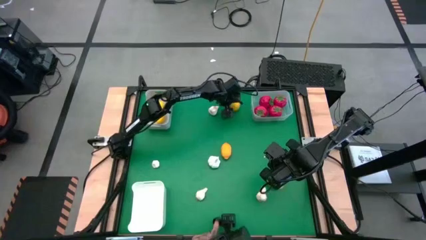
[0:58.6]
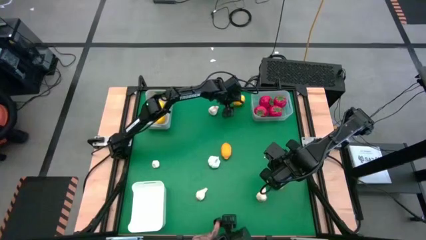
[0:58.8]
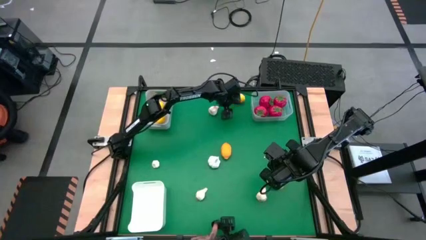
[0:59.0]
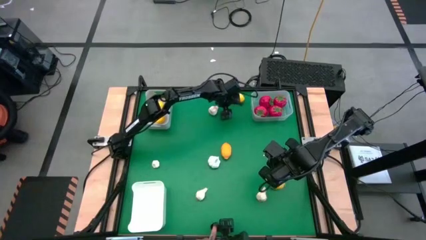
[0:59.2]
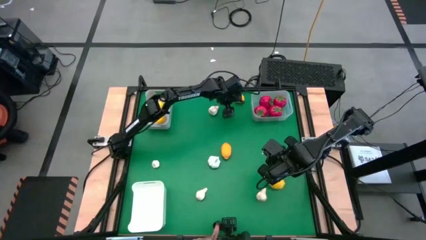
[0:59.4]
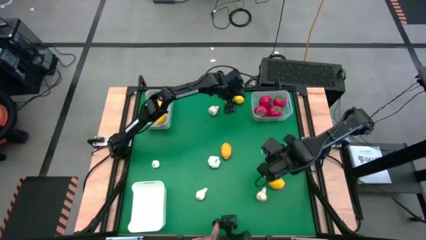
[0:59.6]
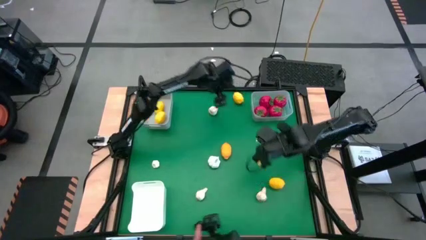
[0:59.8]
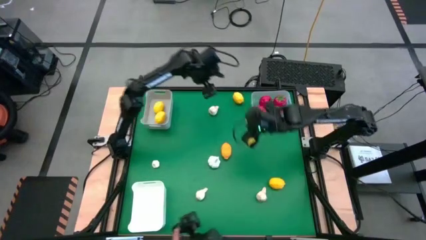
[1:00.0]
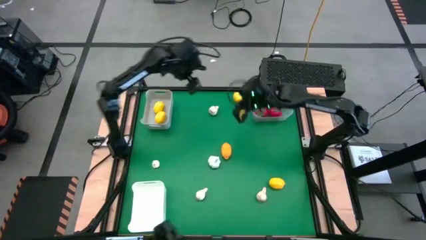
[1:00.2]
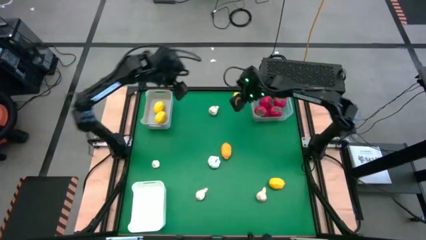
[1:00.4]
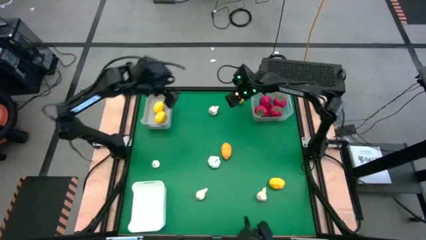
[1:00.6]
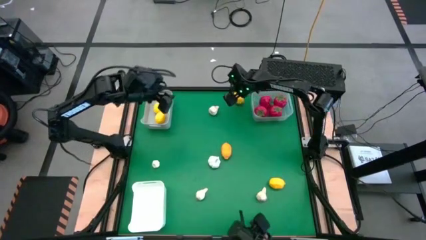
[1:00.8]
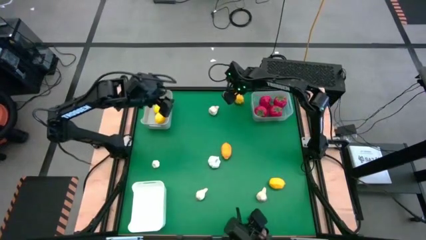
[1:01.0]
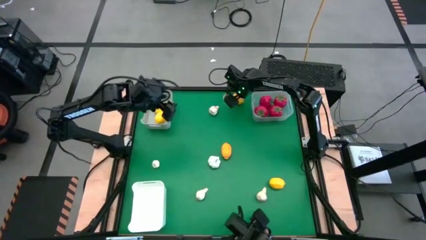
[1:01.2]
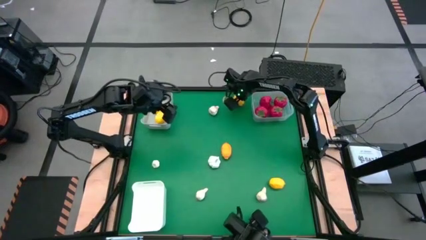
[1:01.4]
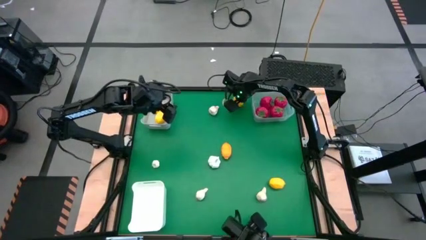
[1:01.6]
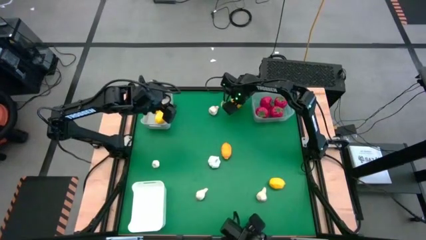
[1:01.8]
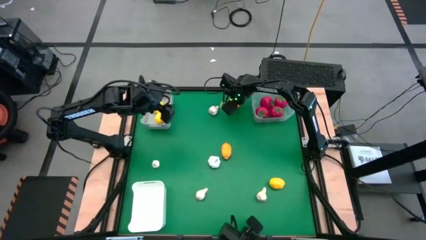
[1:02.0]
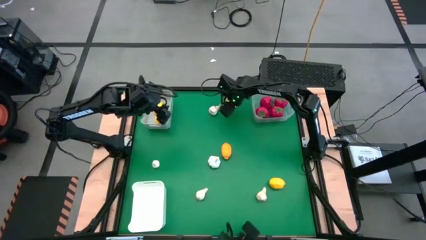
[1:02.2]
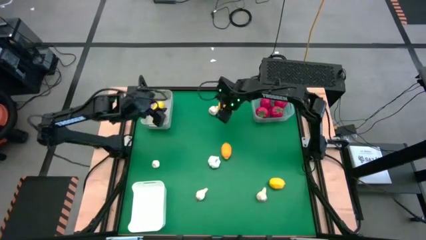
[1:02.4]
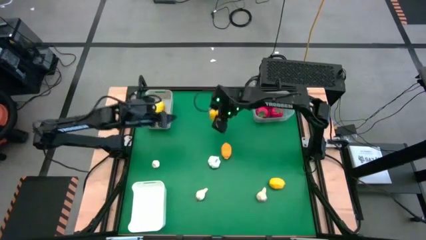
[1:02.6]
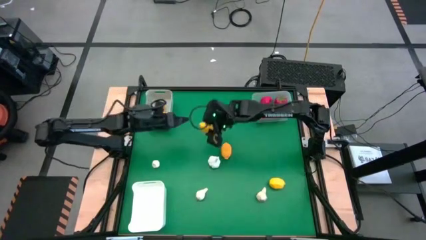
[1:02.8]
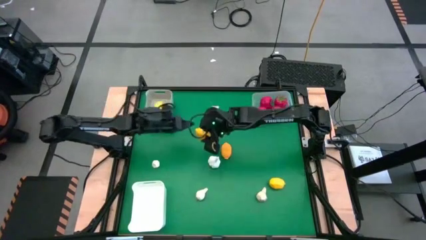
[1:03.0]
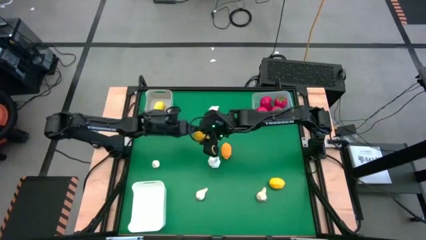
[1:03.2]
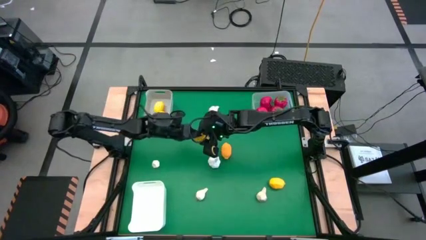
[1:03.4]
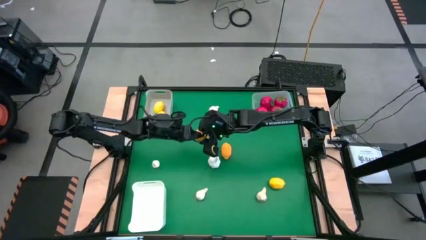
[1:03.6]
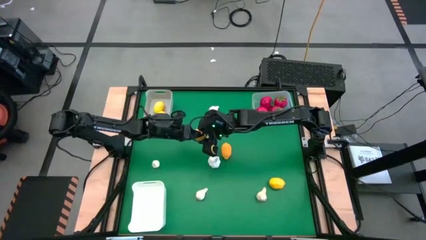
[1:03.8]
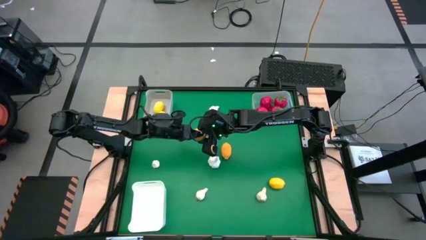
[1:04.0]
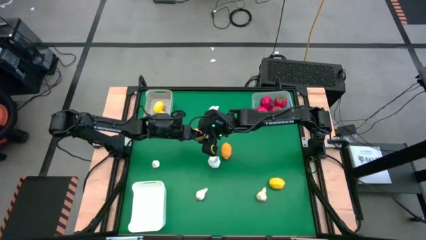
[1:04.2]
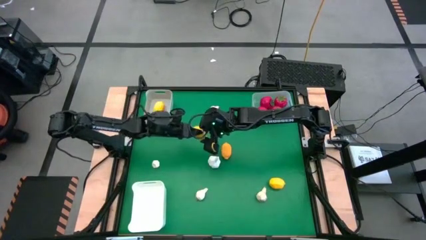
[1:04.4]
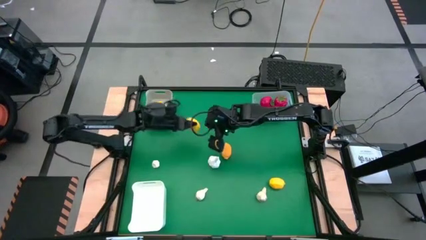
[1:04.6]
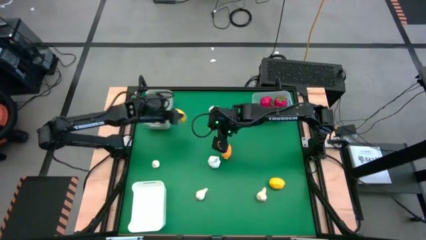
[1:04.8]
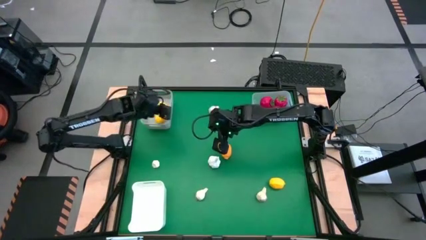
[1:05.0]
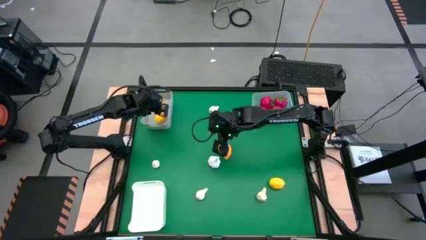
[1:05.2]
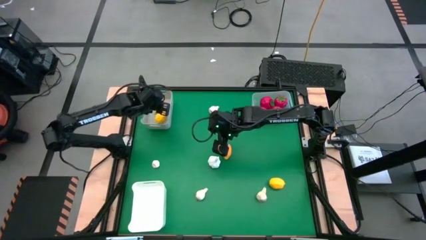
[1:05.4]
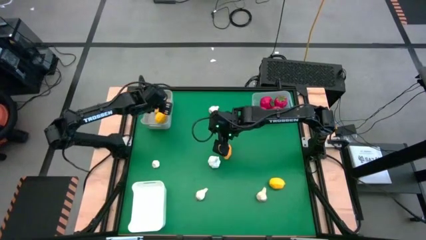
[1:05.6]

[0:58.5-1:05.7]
Task: Sort produce into baskets
Put the lemon into the gray bin

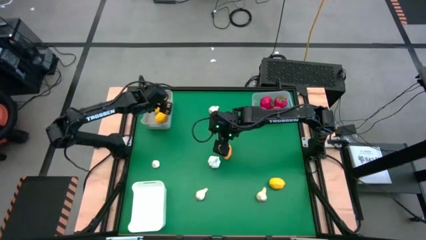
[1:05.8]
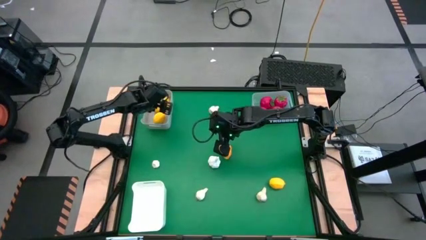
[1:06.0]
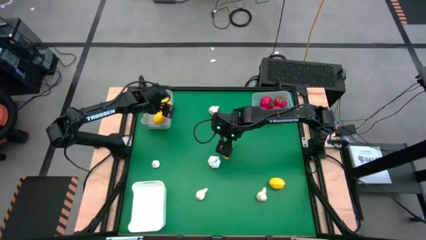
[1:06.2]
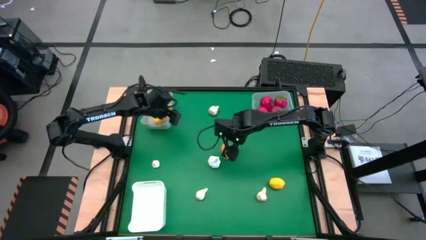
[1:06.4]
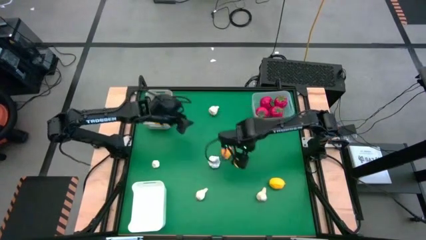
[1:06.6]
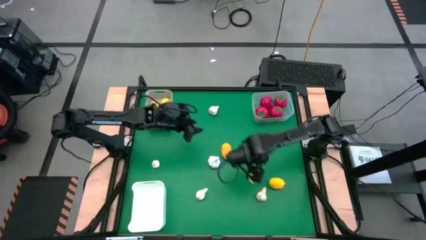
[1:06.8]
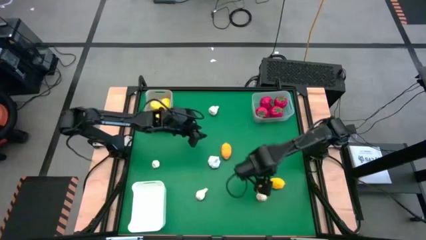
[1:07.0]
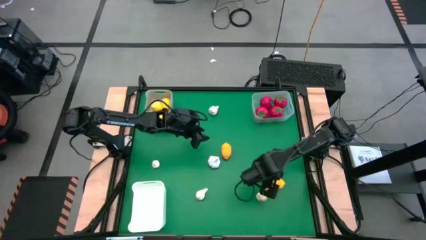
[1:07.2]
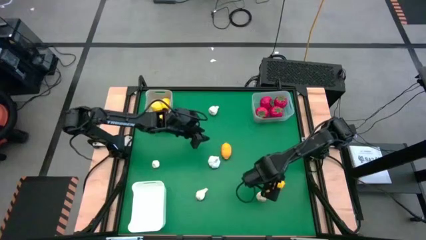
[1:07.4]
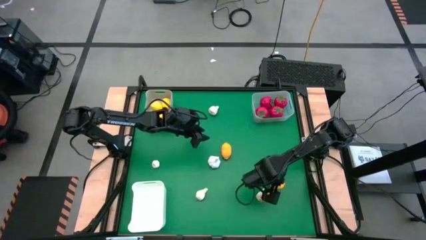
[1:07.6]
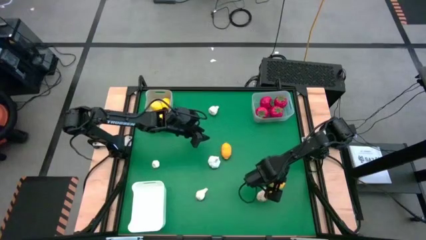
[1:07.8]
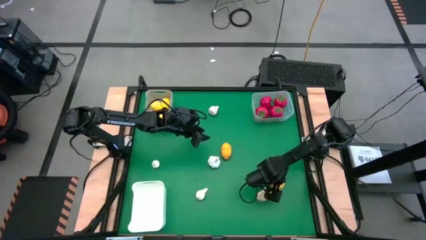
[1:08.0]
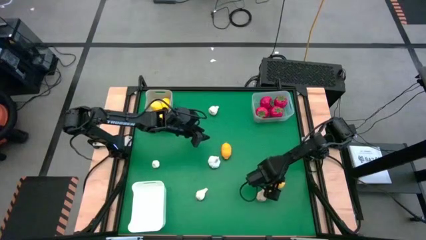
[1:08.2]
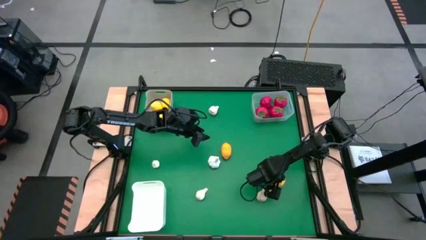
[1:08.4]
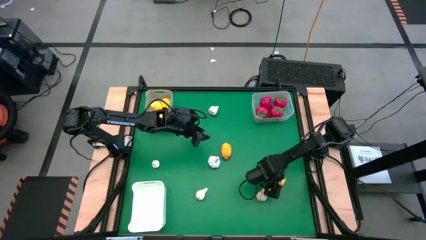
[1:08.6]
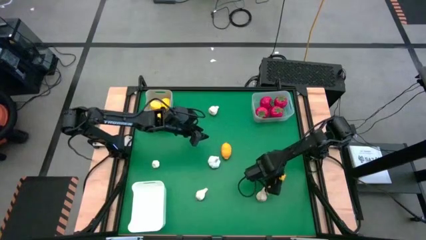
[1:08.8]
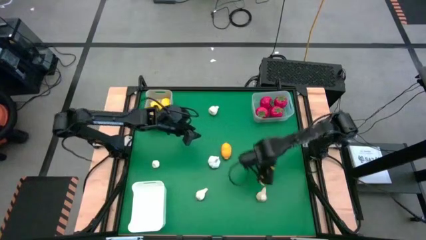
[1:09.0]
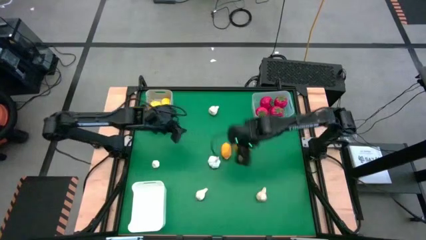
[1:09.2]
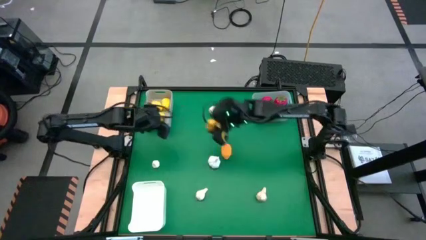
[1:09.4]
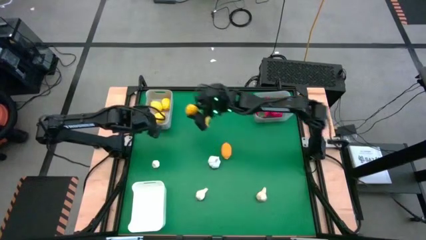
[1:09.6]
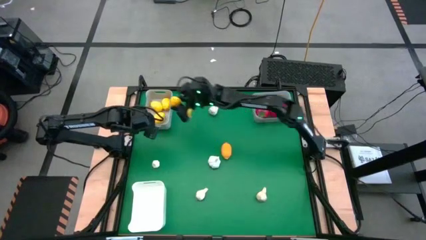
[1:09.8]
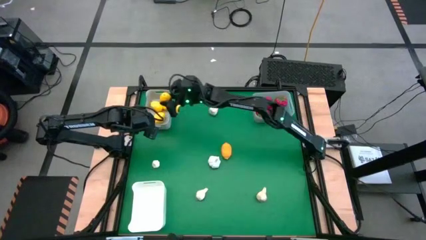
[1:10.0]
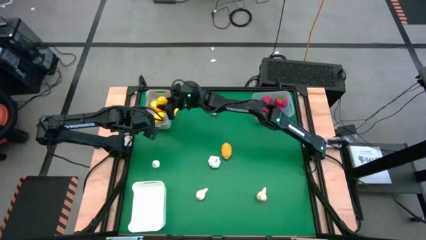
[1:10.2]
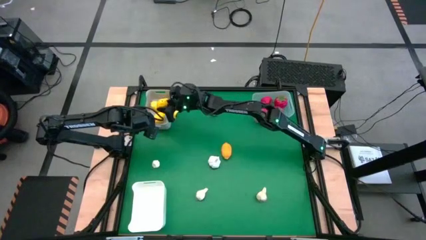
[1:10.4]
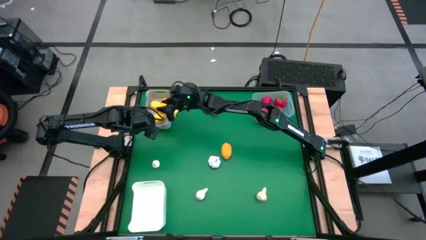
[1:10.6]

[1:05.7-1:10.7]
Put the lemon into the gray bin

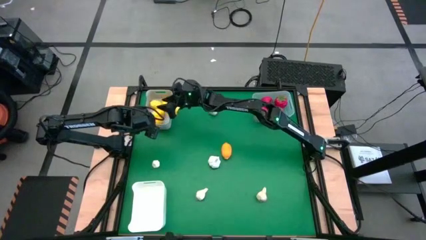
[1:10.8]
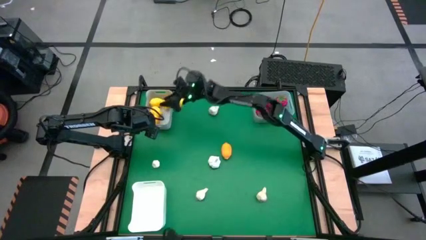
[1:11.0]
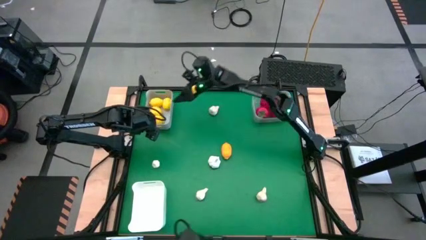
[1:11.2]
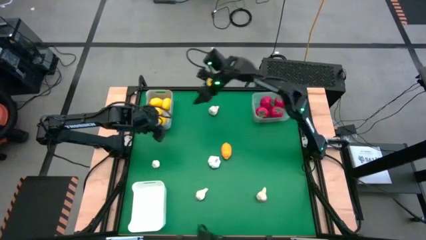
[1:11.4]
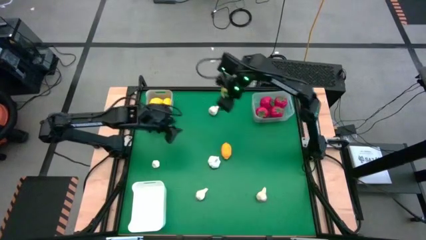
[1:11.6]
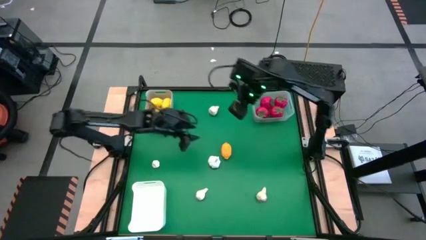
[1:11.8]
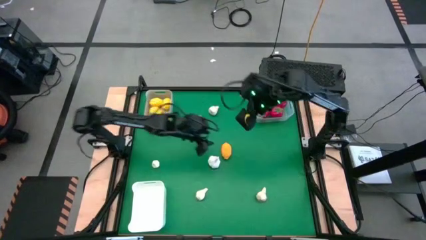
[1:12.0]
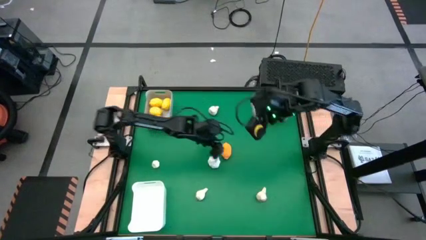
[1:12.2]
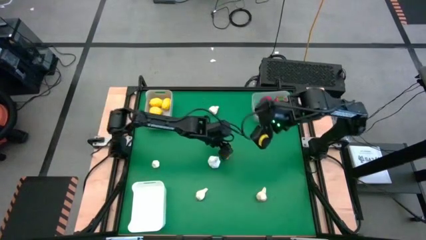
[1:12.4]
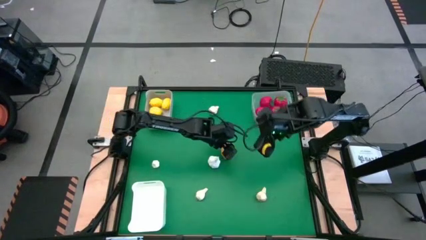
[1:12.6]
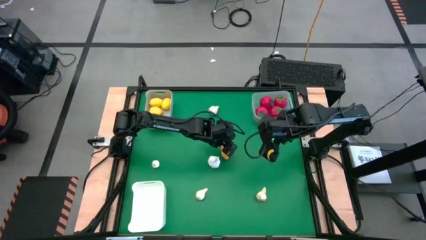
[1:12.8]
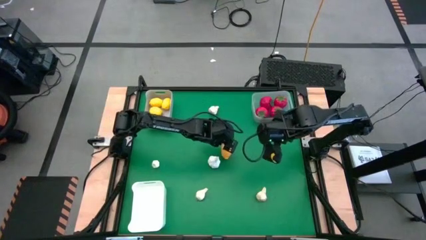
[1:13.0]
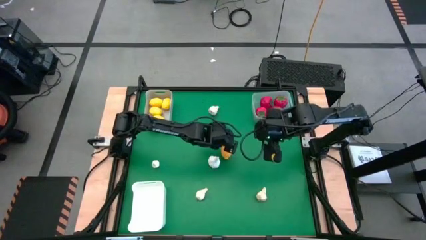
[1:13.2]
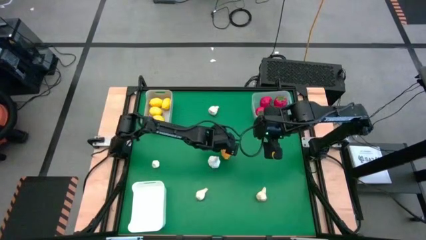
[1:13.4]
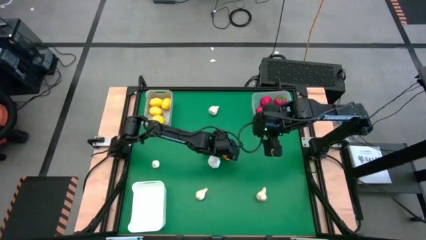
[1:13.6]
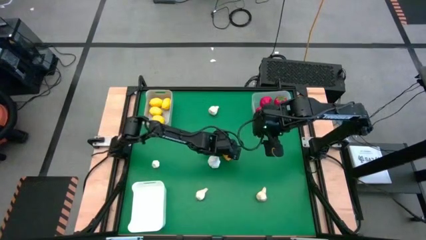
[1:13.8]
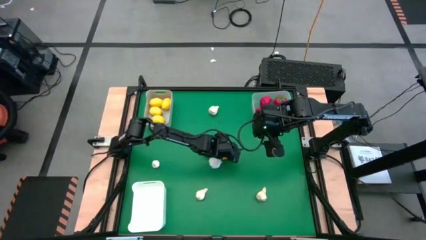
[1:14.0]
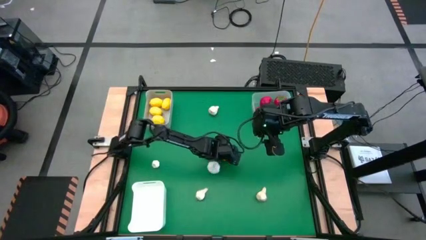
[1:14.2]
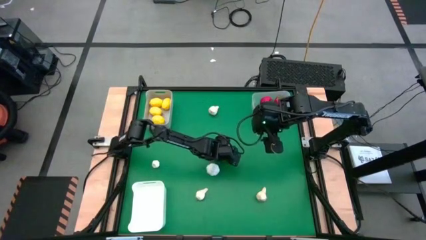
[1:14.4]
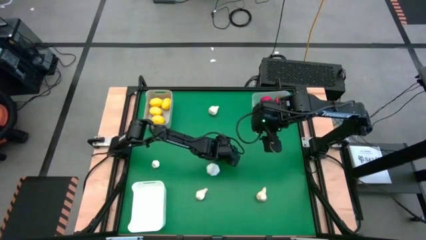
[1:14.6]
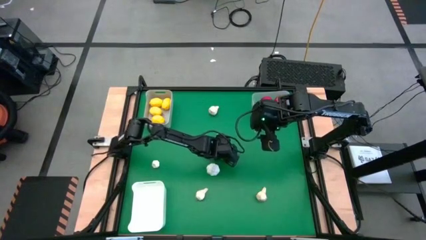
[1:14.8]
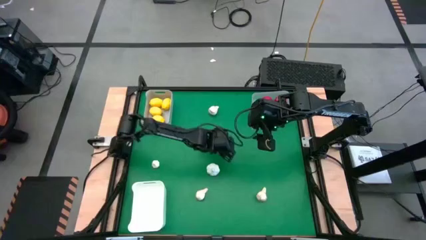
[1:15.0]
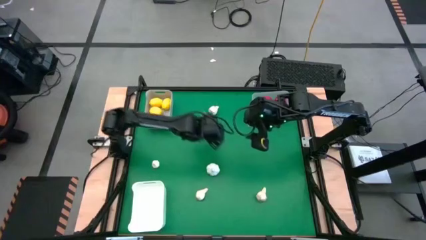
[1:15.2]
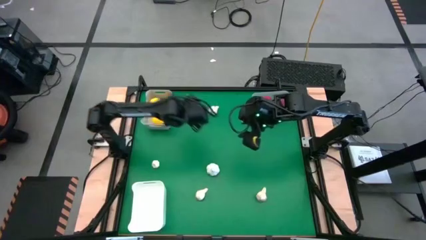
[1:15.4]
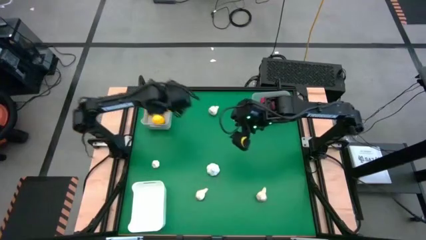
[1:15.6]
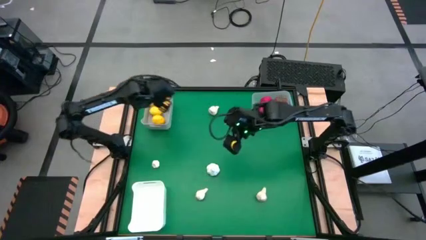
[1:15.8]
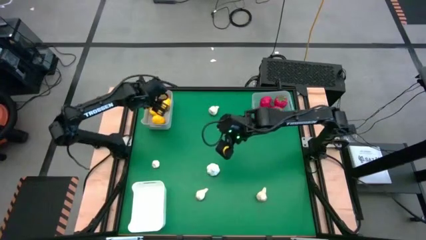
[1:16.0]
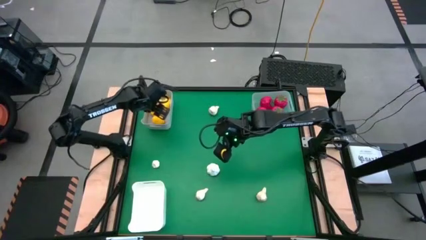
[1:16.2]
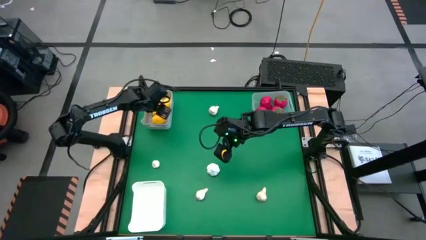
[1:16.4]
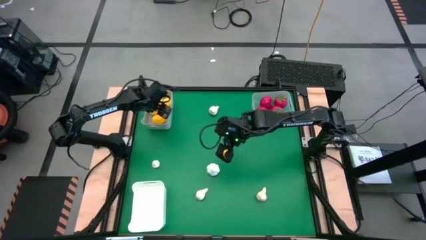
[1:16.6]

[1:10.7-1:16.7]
Put the lemon into the gray bin
